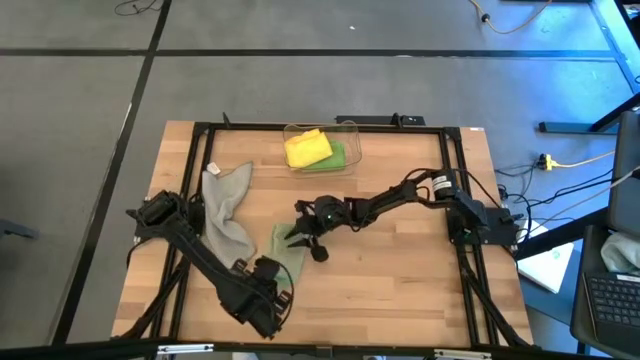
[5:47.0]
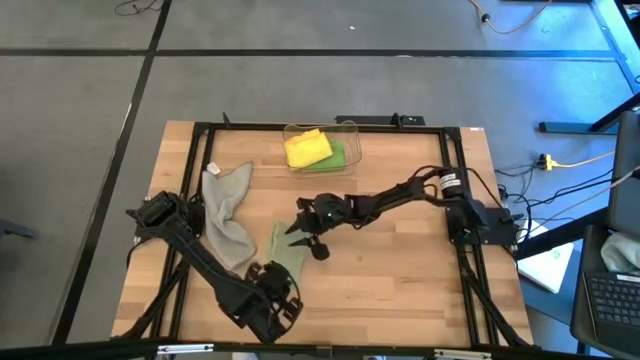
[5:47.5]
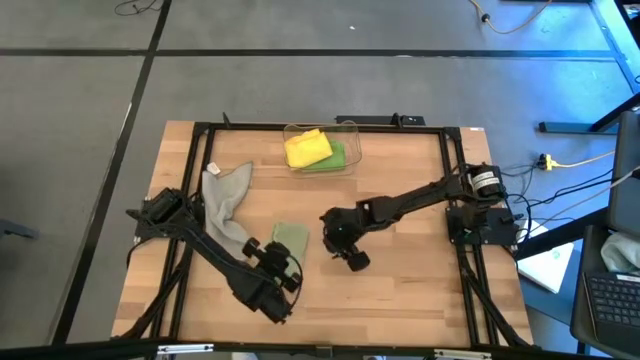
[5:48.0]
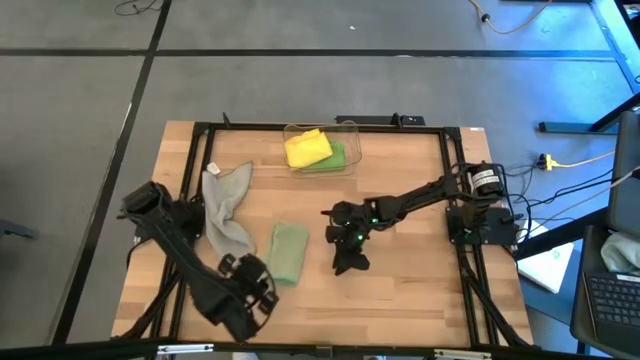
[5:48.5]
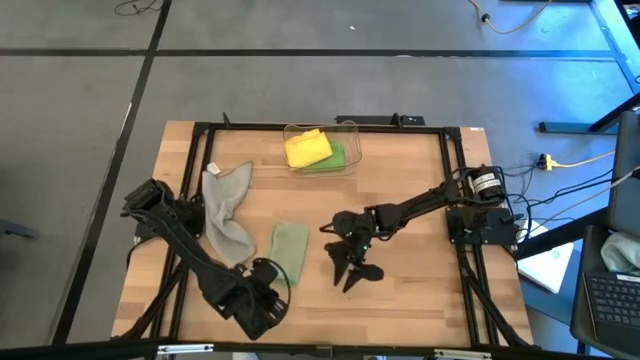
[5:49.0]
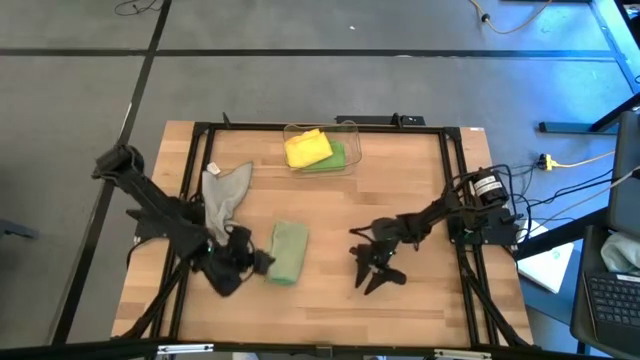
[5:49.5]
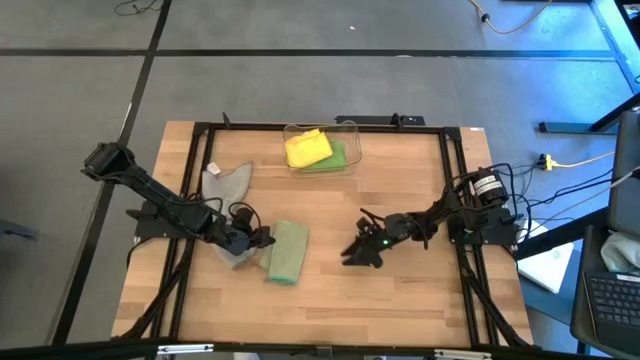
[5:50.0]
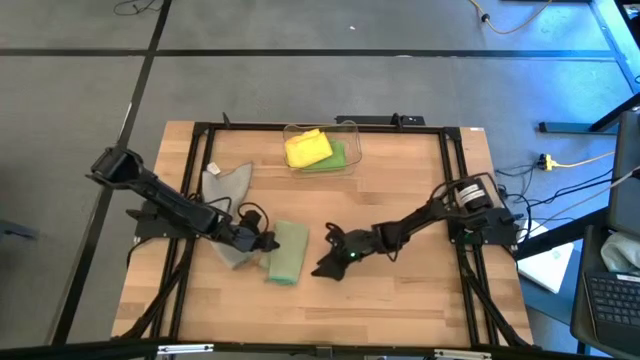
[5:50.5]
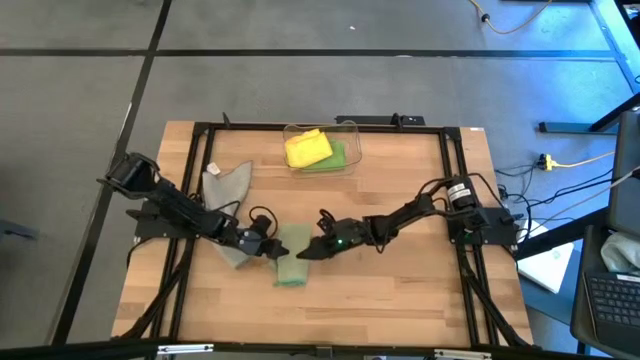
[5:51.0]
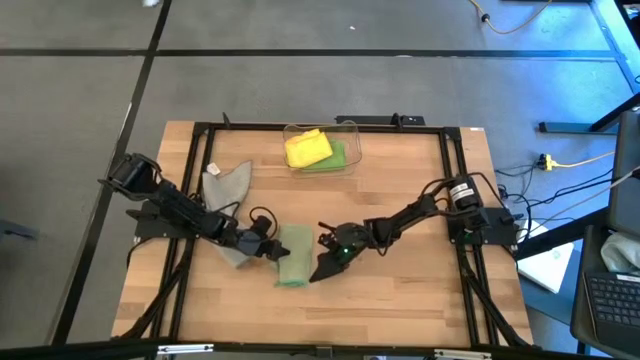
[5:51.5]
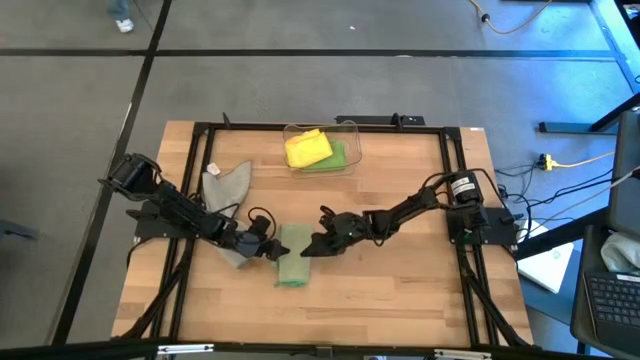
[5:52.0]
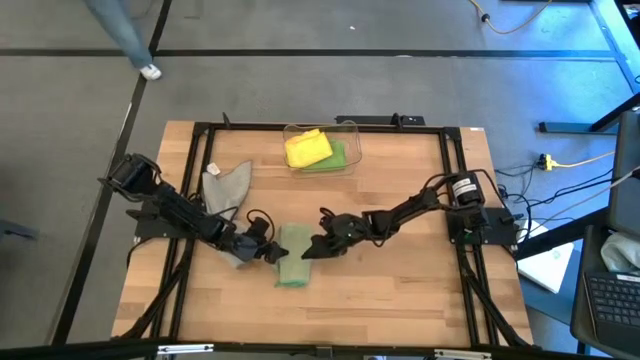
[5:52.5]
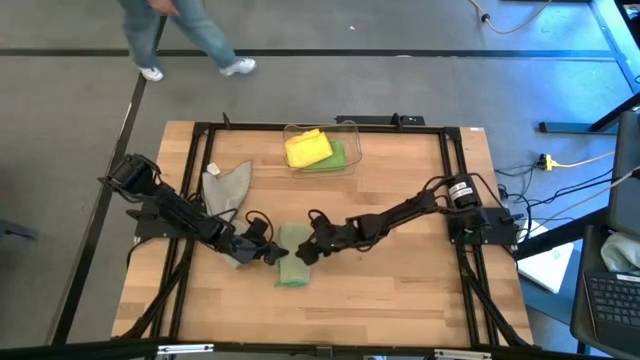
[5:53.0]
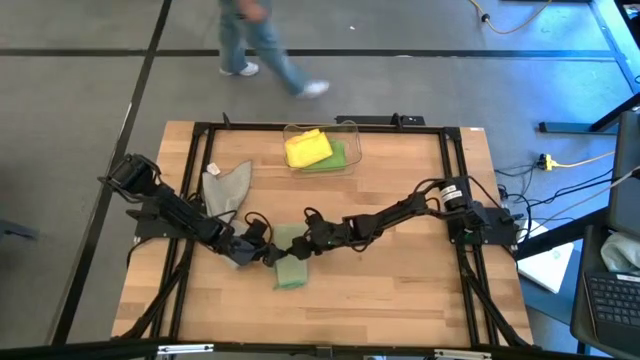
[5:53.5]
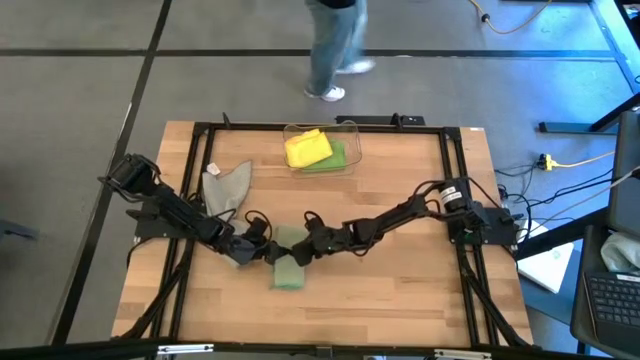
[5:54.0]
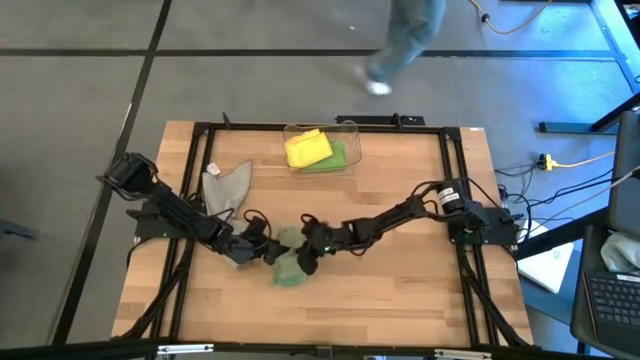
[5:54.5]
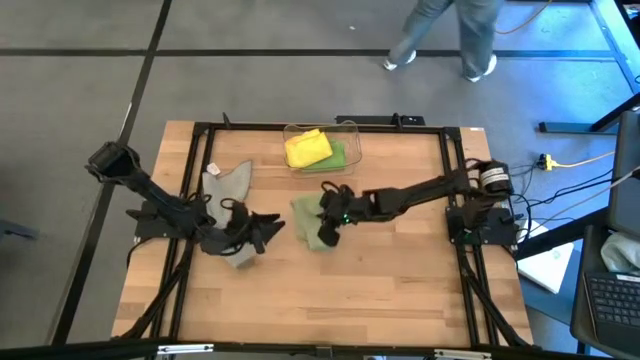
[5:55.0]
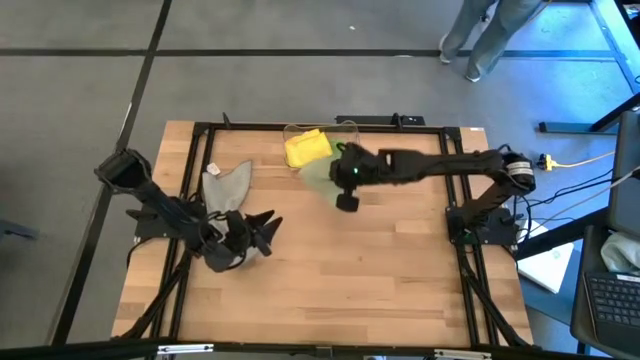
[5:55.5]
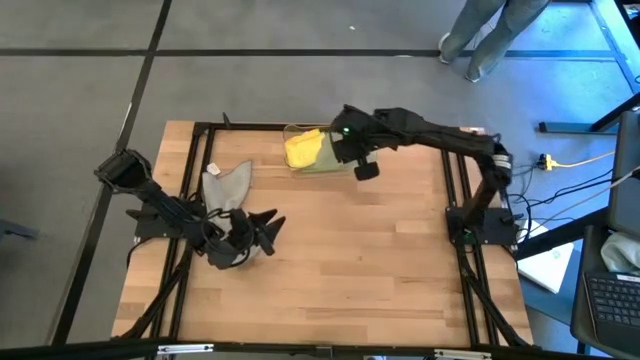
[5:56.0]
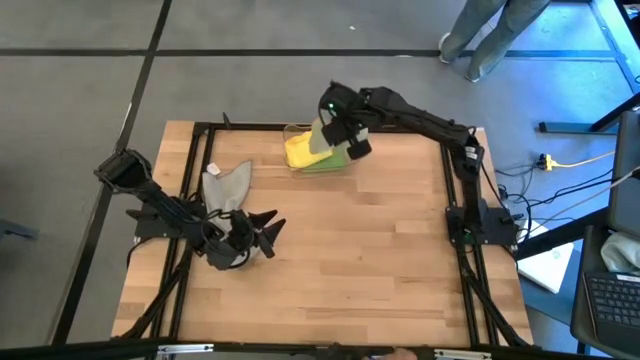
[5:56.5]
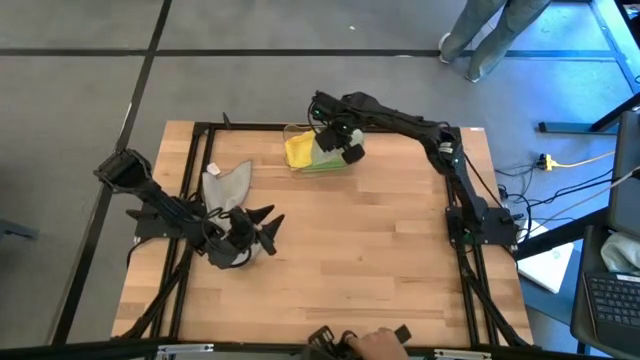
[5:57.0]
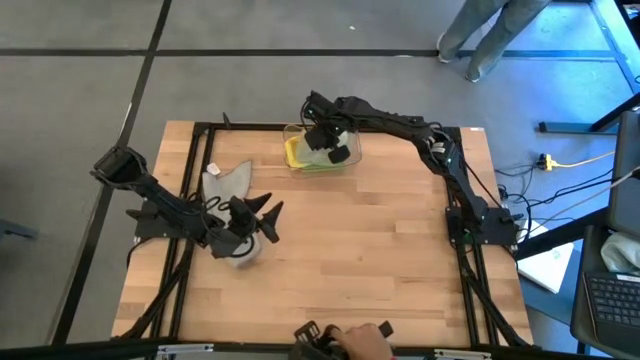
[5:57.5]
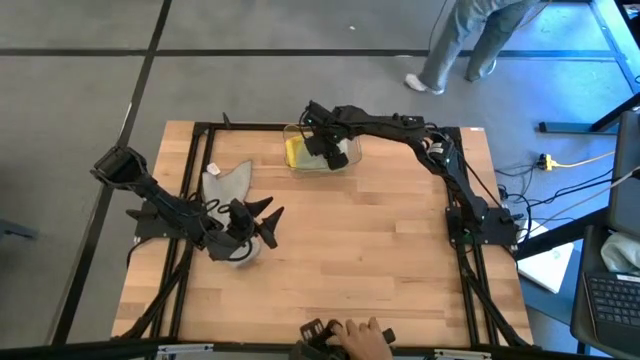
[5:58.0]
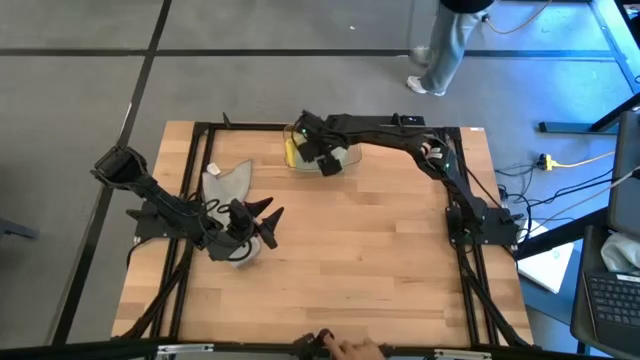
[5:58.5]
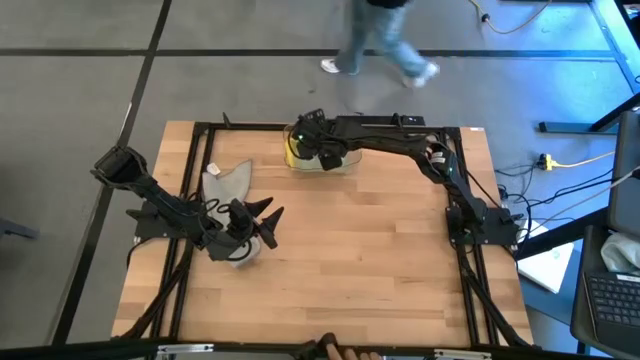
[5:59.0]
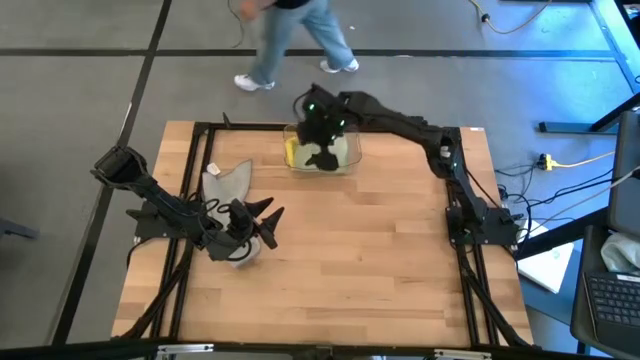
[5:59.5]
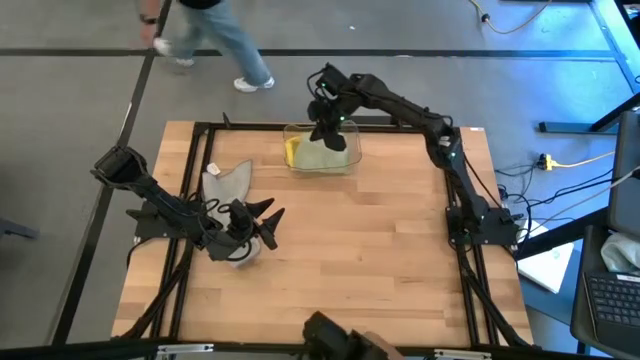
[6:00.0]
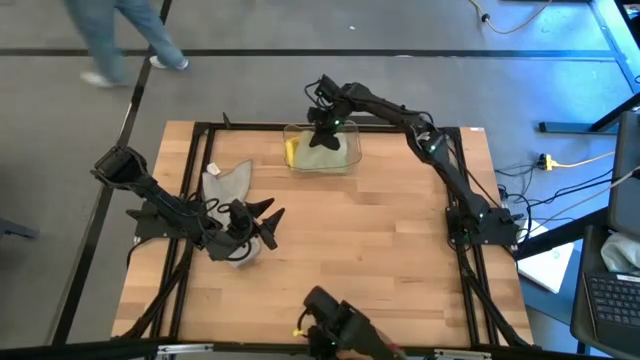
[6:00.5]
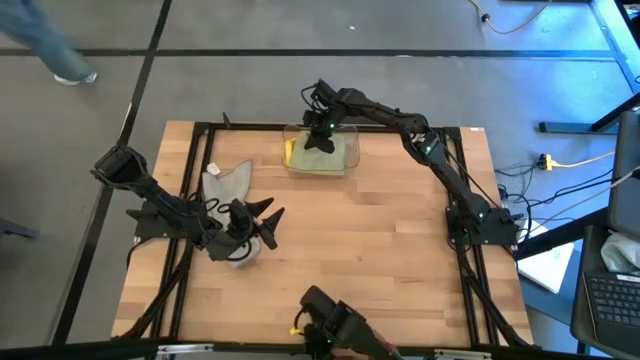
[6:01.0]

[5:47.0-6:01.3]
Task: Fold microfiber towels
Put the light green microfiber cloth into the transparent bin

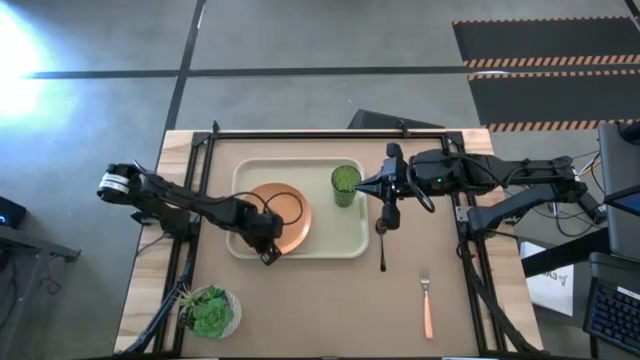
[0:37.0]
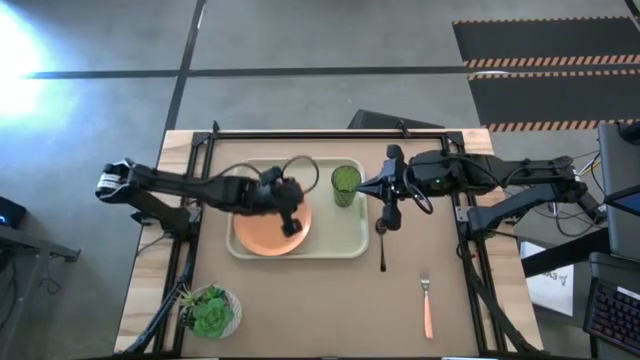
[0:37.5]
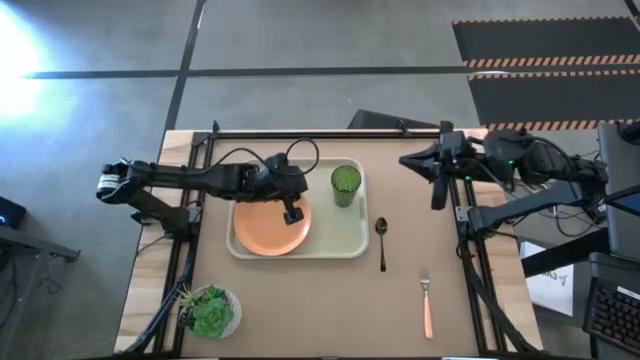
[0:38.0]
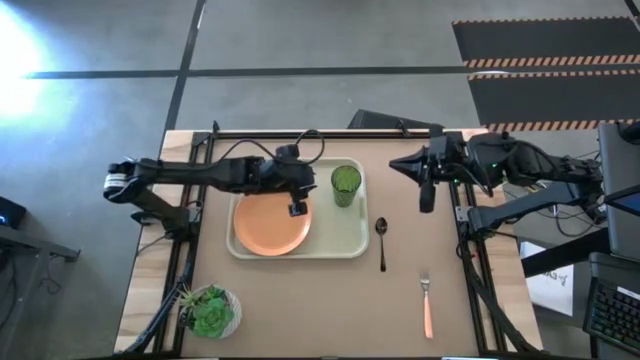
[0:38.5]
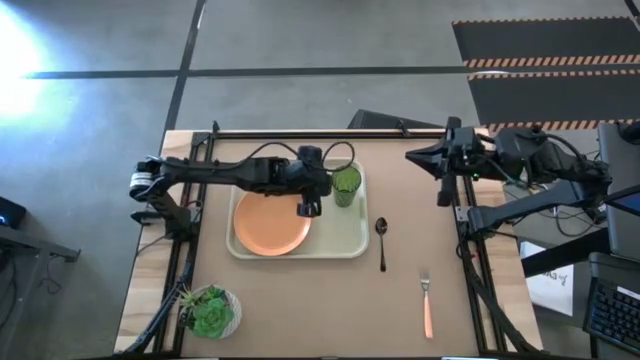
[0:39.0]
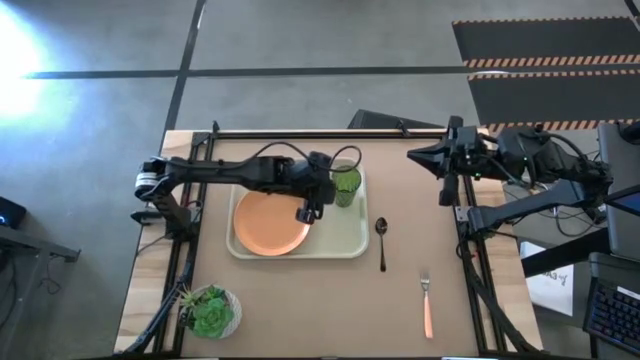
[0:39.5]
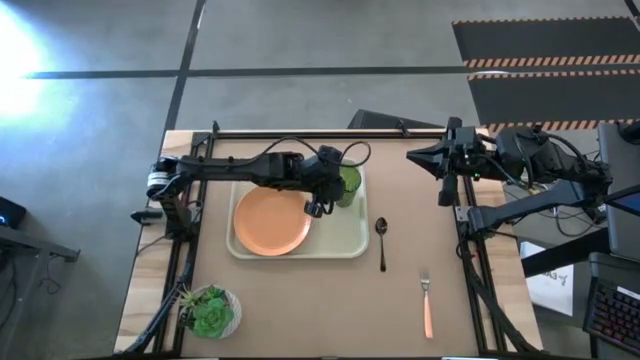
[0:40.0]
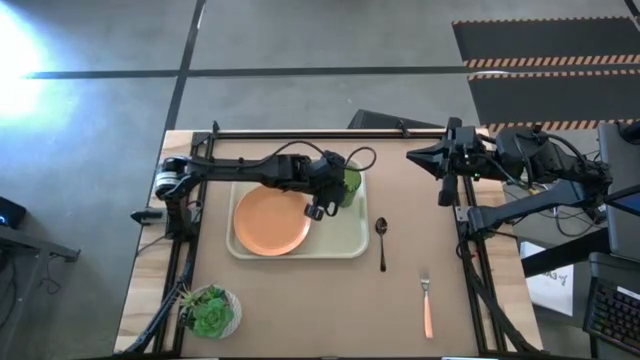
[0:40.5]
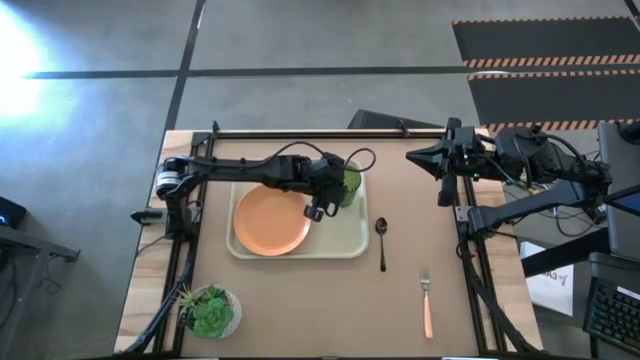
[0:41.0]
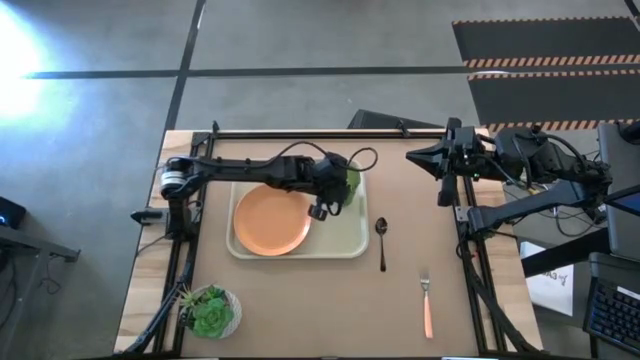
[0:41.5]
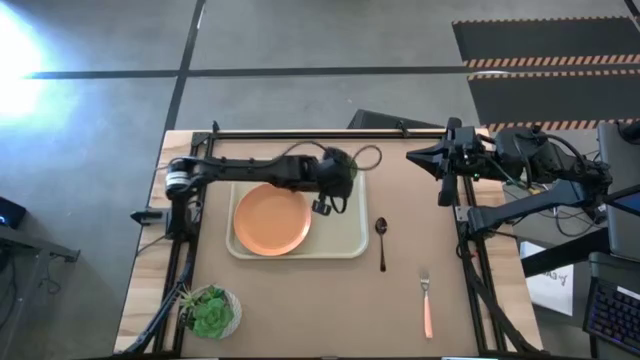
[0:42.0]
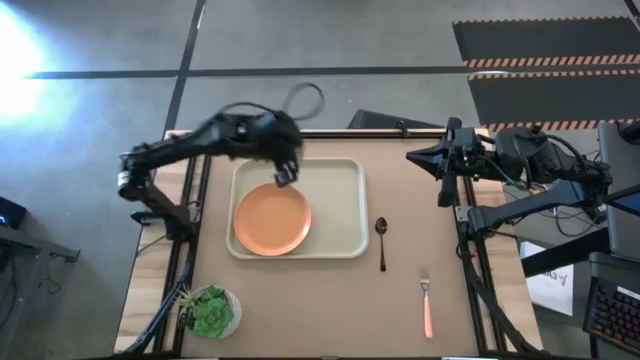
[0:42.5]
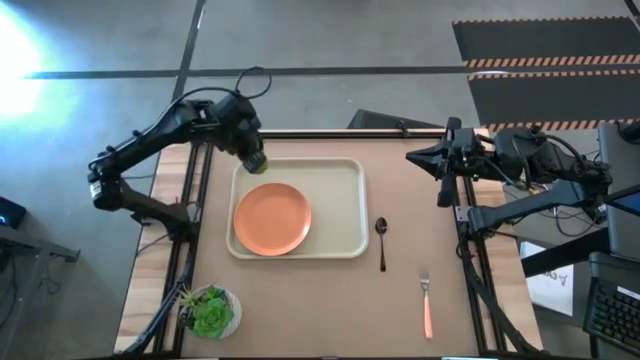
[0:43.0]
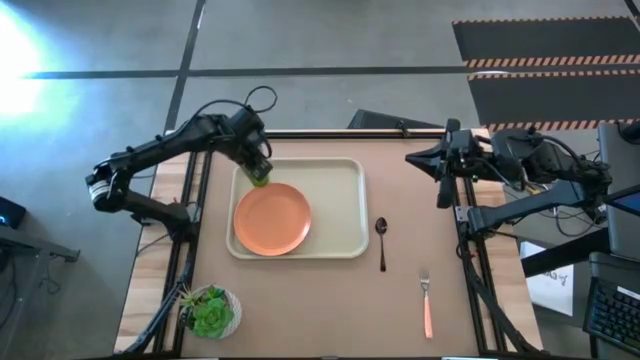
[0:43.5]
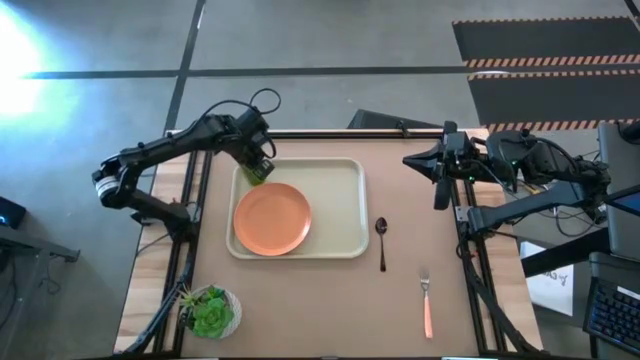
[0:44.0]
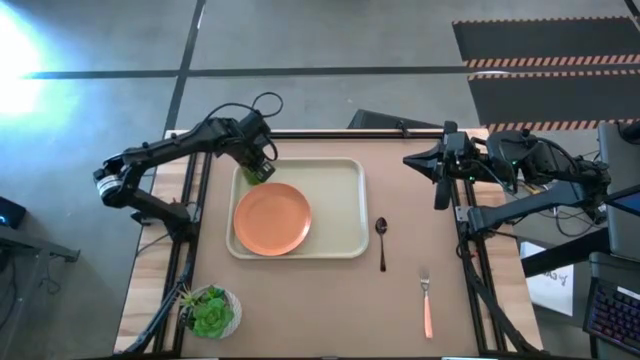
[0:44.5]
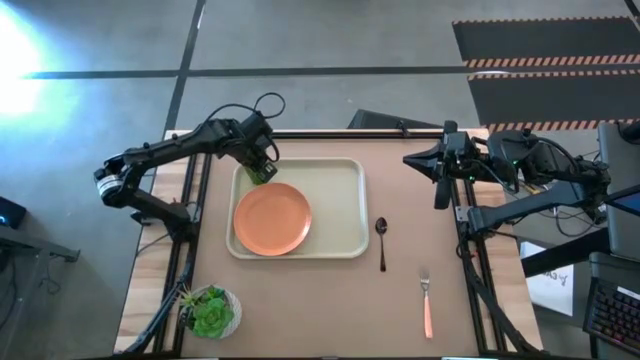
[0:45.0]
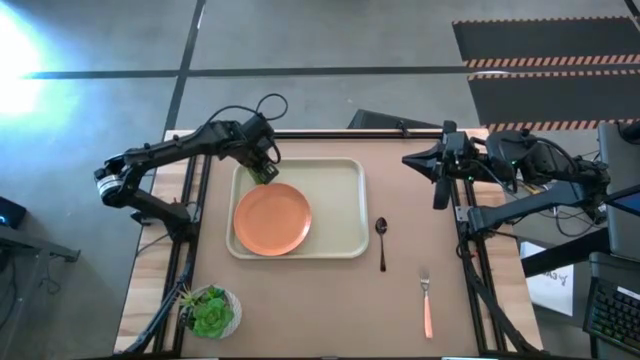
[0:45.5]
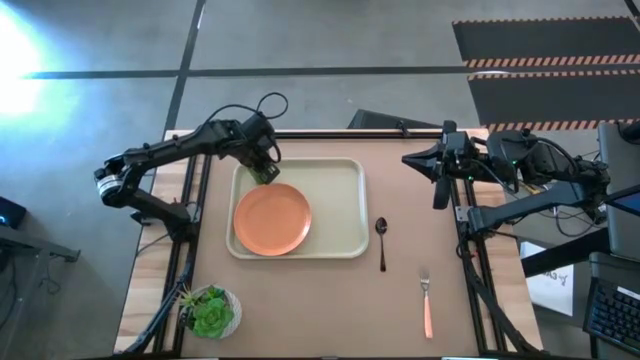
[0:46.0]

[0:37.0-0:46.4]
Task: Pick and place plate/cup/fork/spoon on tray
Move the green glass to the top left of the white serving gray
